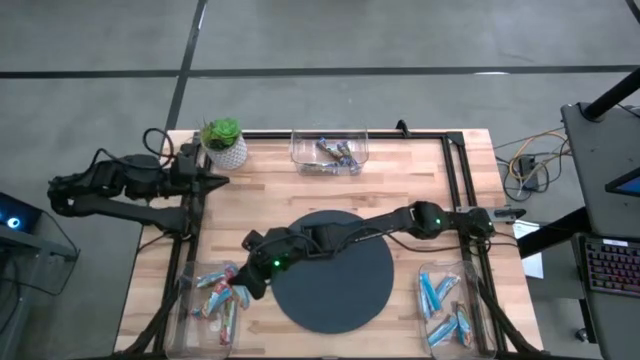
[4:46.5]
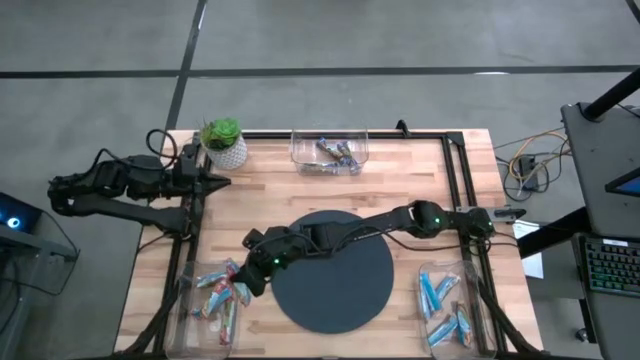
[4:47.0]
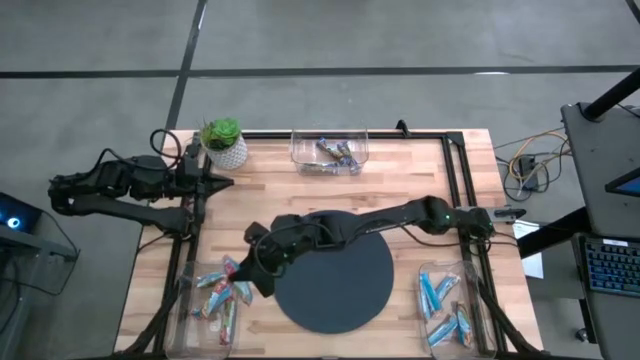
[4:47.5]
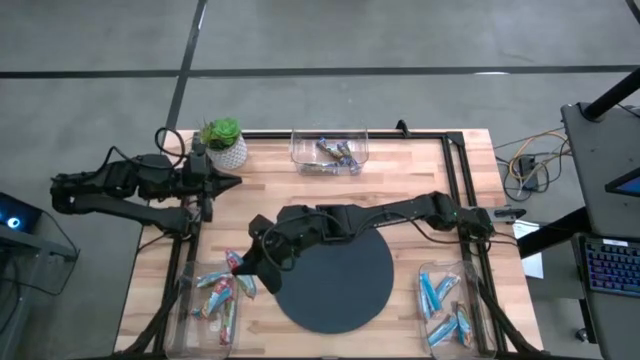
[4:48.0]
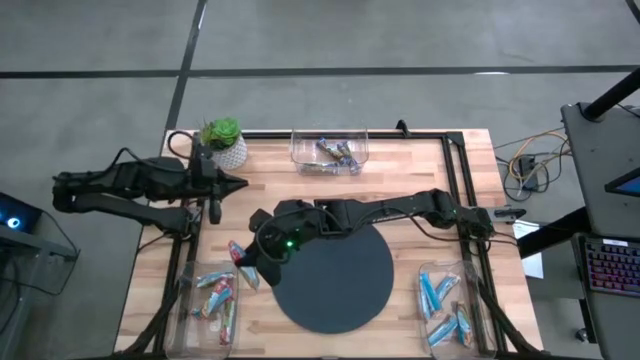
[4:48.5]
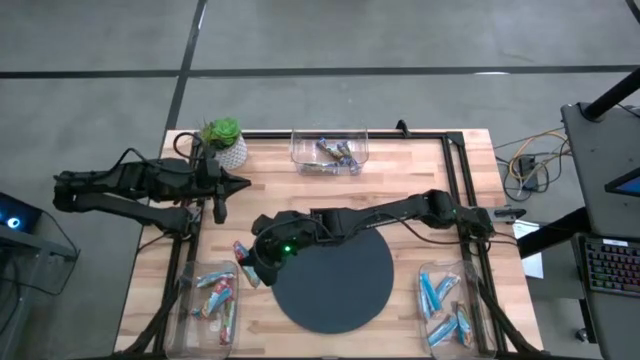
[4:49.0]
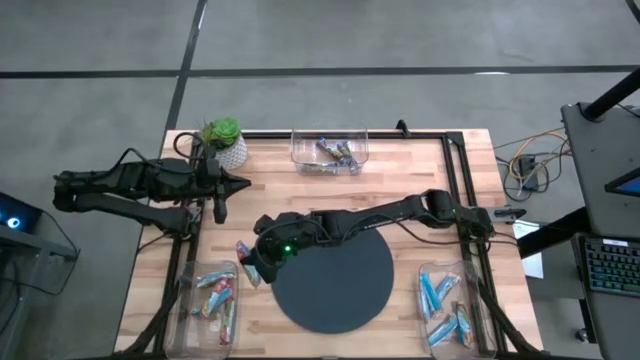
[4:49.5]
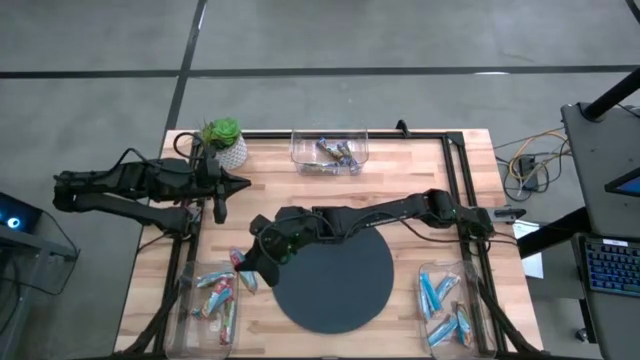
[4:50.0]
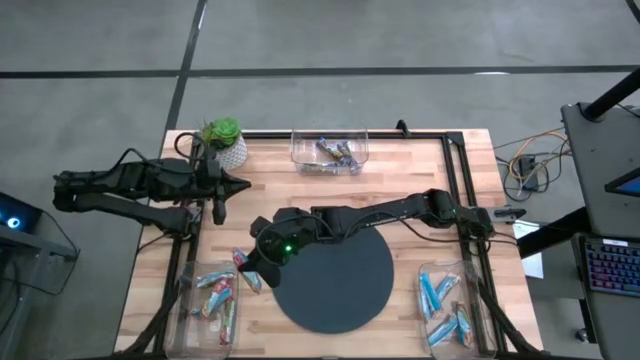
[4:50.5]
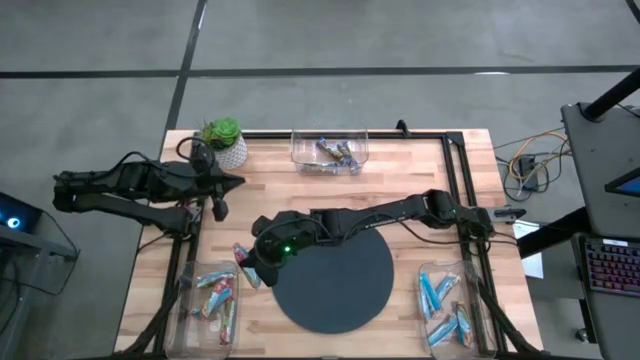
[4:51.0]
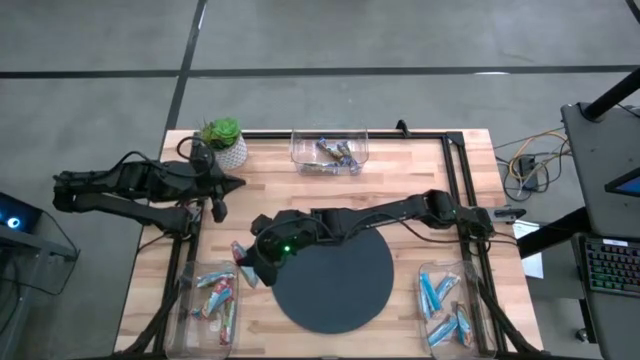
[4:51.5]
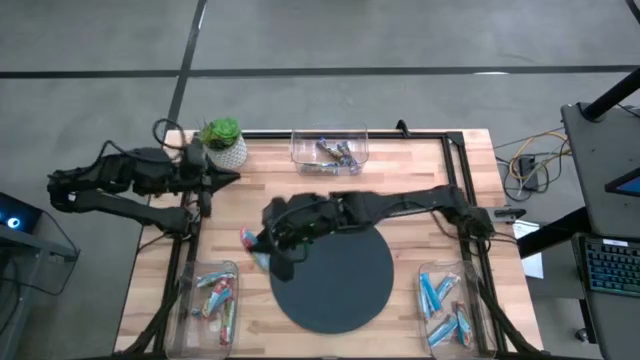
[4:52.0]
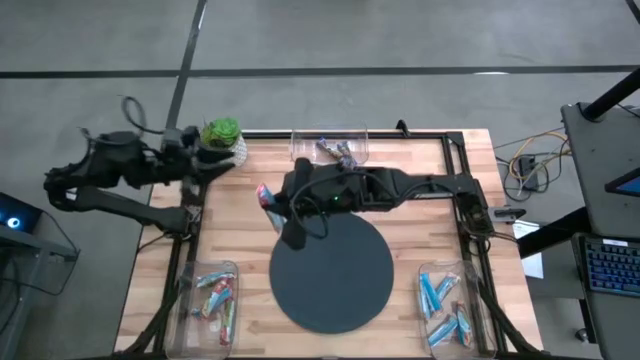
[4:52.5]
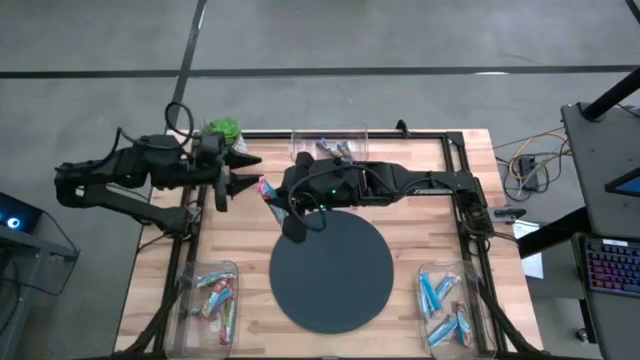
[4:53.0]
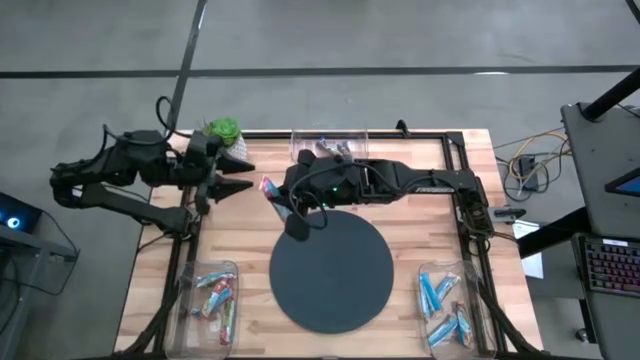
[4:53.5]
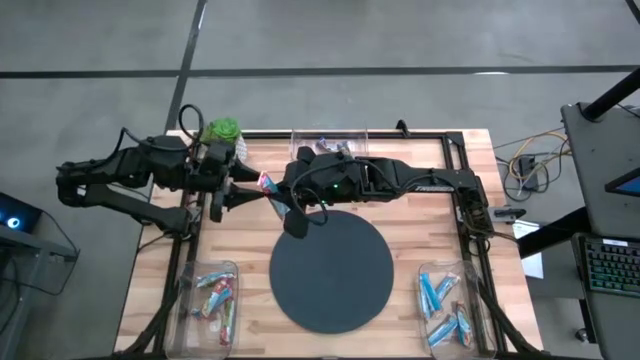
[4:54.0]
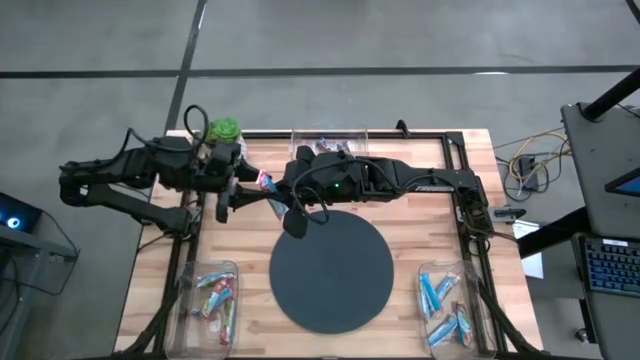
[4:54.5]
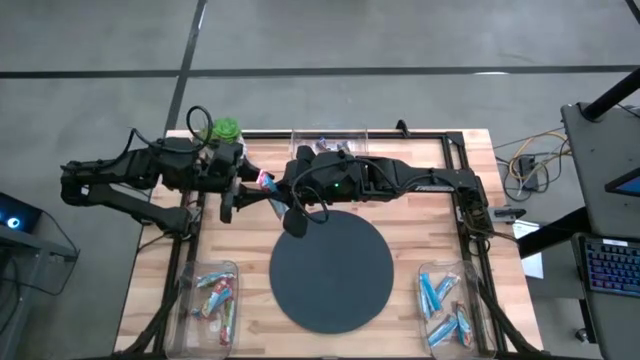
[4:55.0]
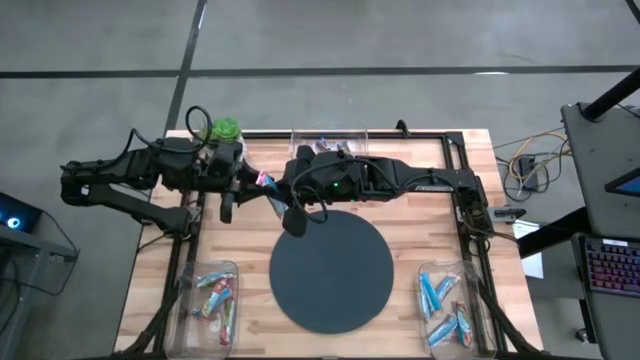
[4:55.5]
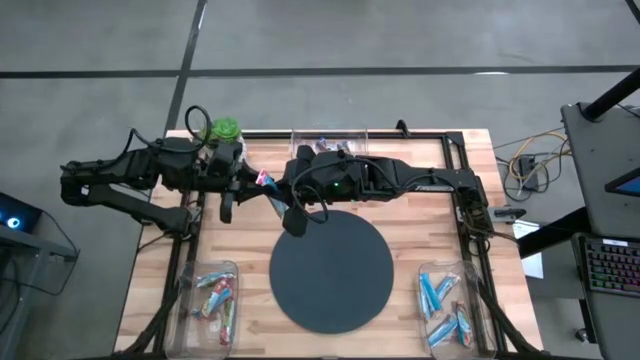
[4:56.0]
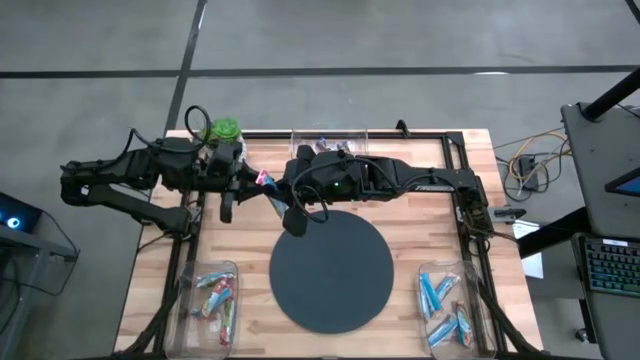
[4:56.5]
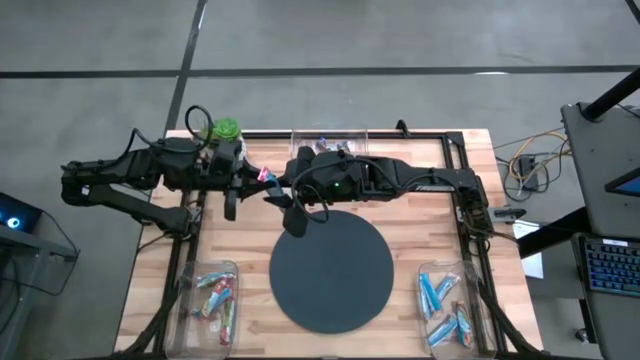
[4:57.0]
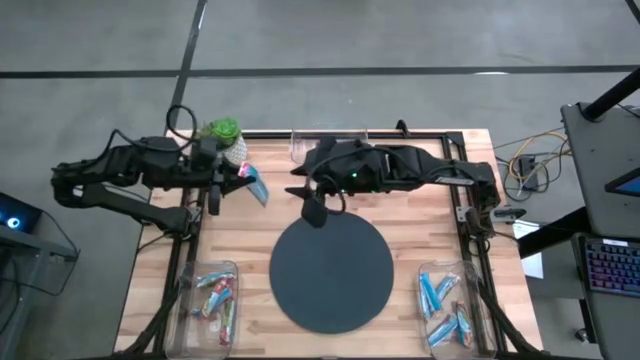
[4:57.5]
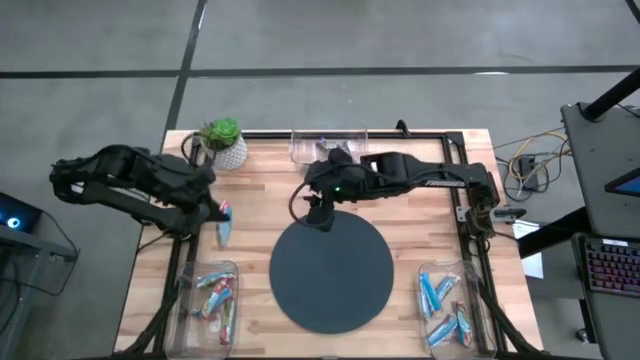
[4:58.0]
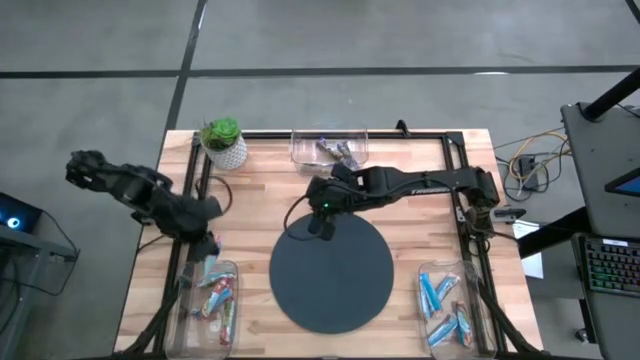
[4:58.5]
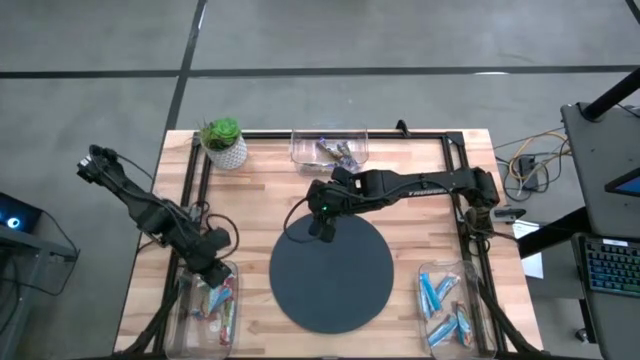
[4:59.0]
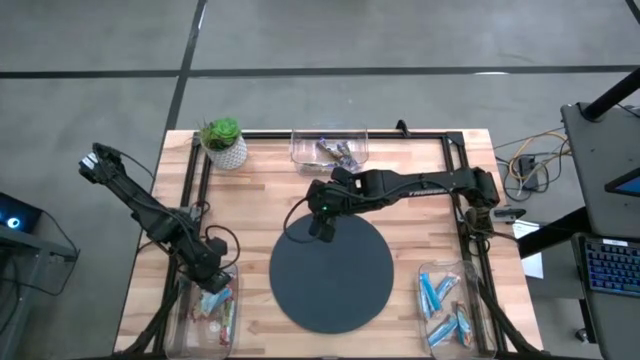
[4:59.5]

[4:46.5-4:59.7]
Task: Pick and place Granola Bars by type
Put the red granola bar into the bottom left transparent bin

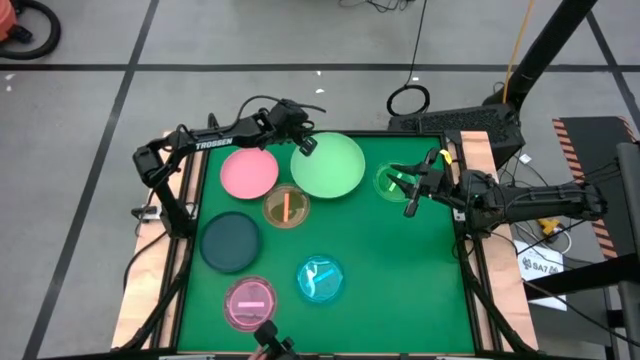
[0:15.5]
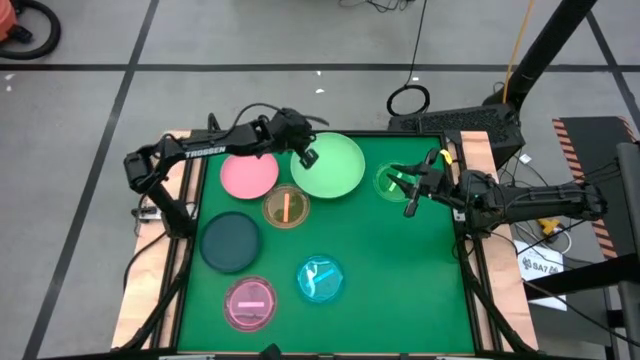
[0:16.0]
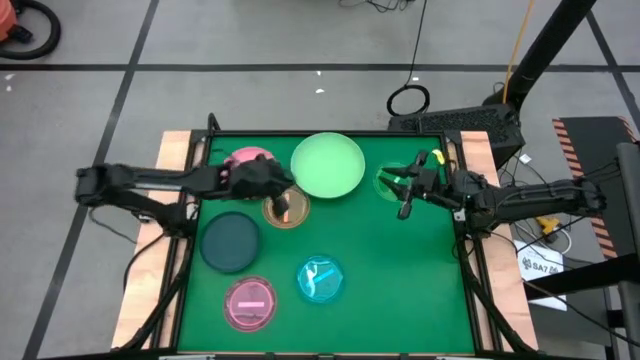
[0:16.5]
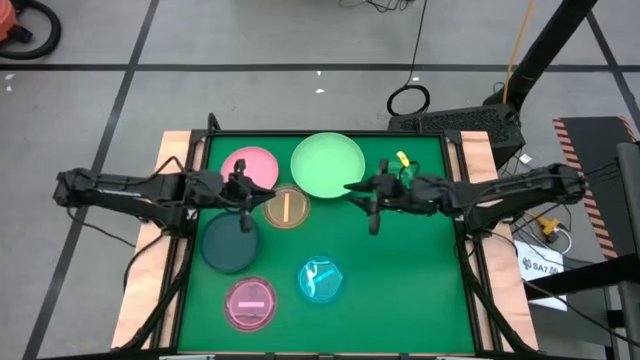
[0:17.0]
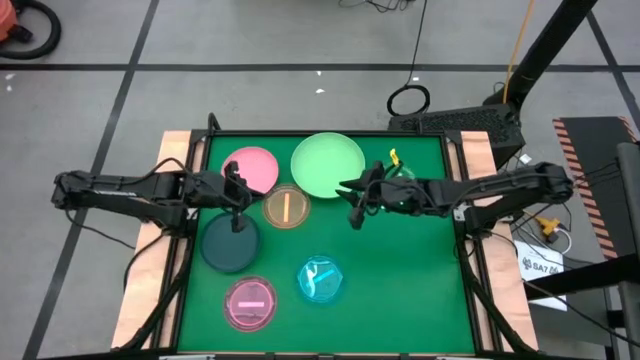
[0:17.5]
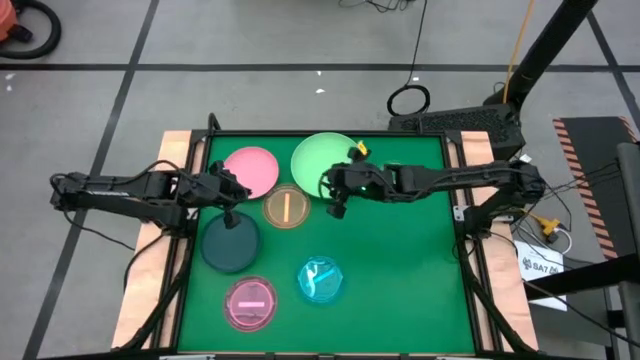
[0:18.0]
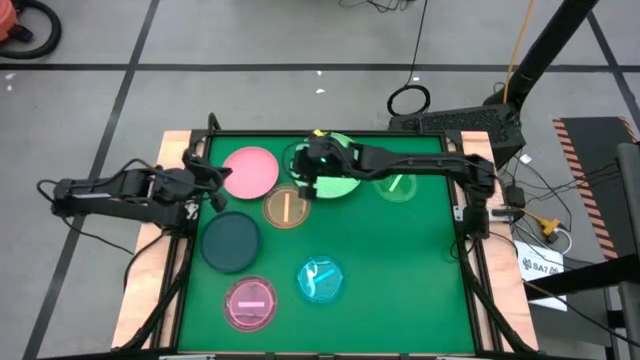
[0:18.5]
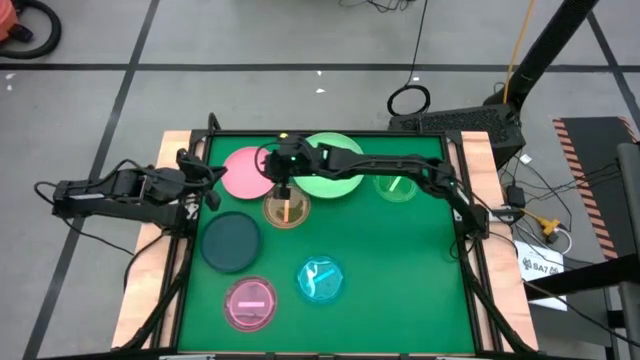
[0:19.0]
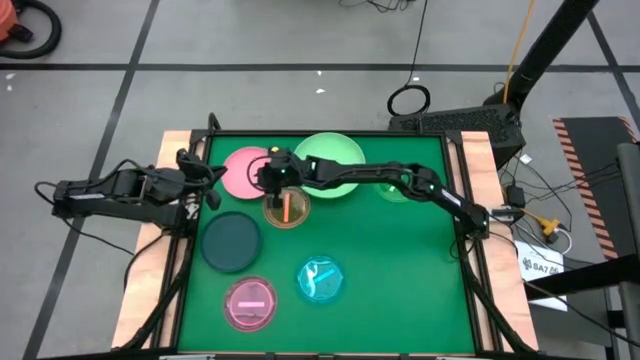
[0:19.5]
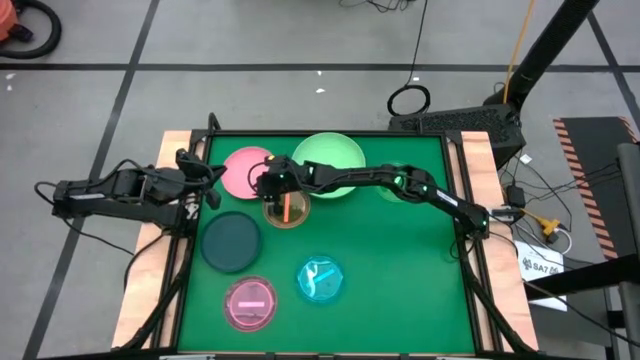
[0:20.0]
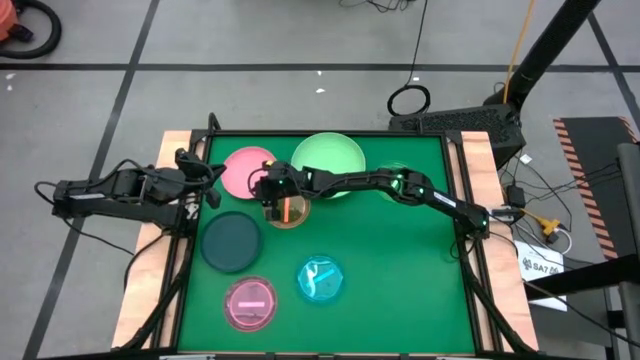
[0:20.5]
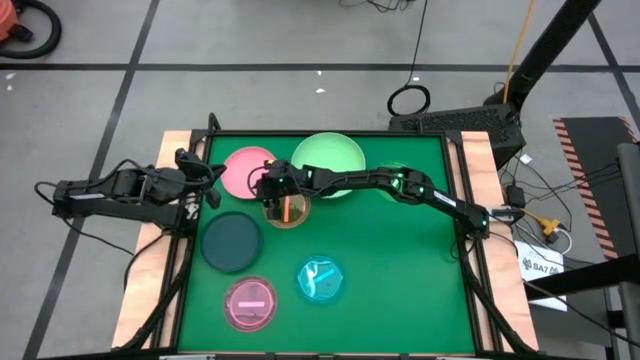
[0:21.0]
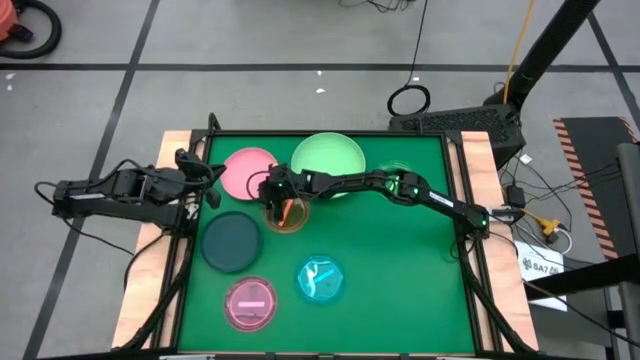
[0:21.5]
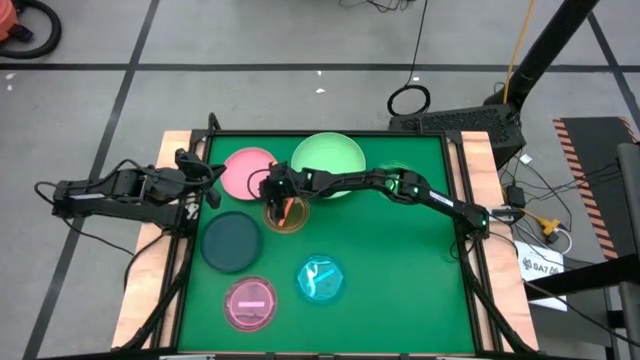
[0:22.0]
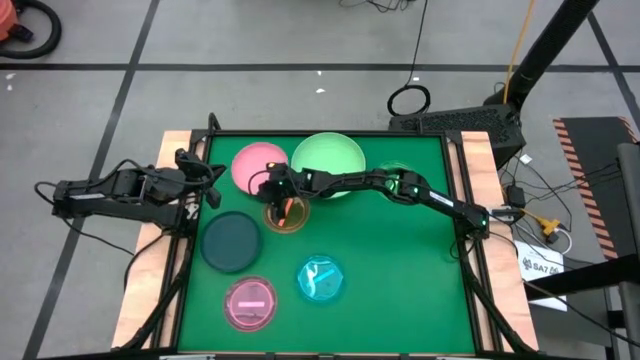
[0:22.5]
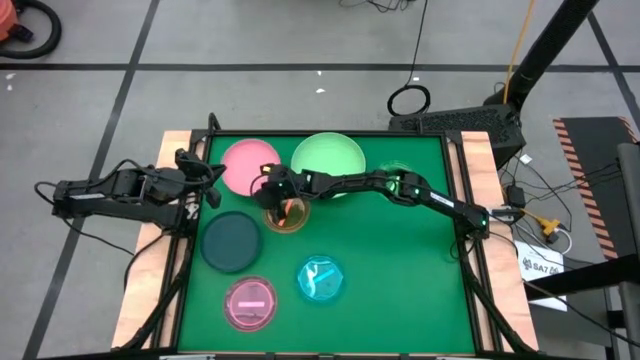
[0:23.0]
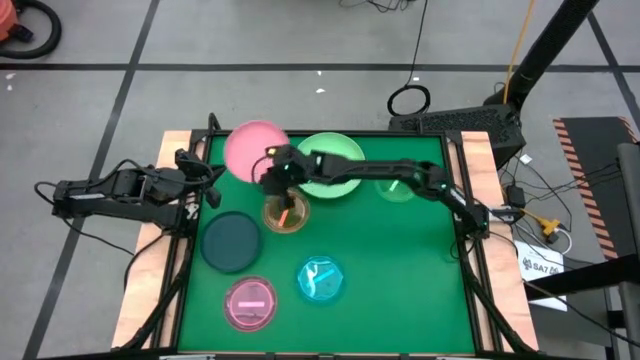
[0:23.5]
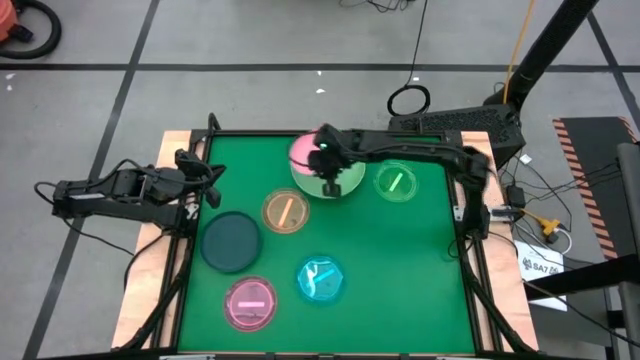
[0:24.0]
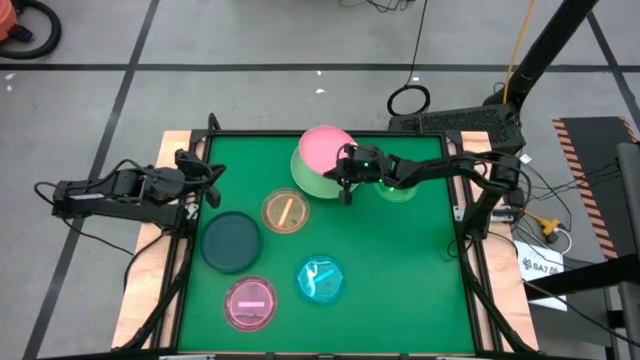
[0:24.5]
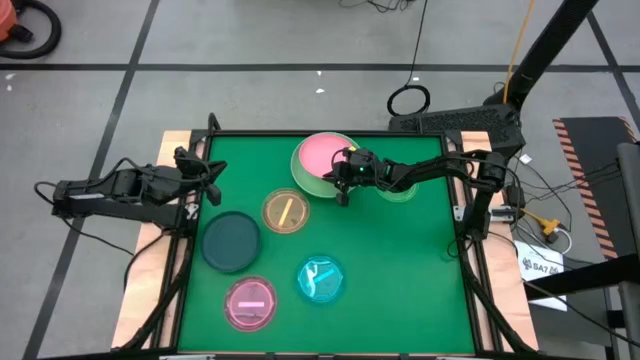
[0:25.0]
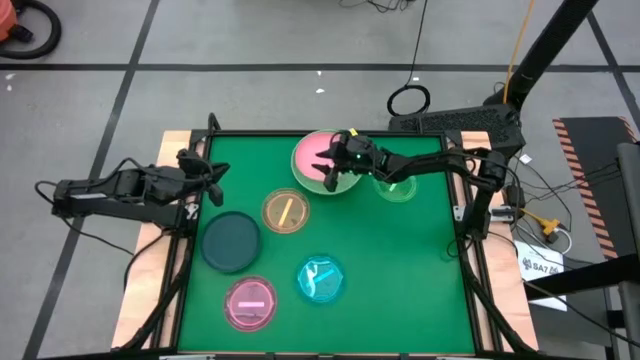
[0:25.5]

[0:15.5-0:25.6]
Task: Stack plastic plates
Stack the pink plate on top of the light green plate
